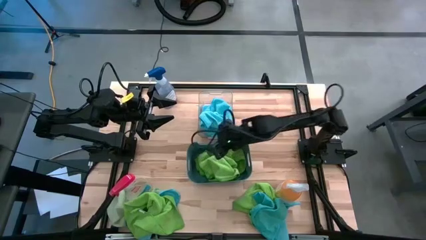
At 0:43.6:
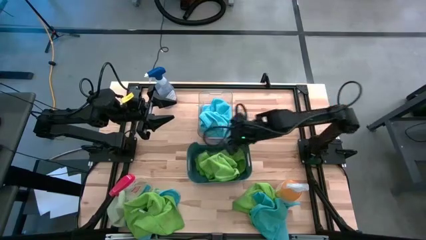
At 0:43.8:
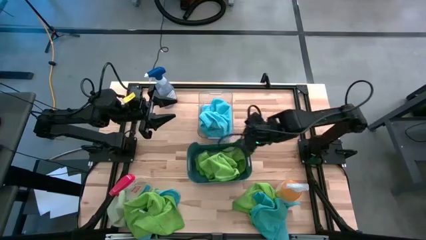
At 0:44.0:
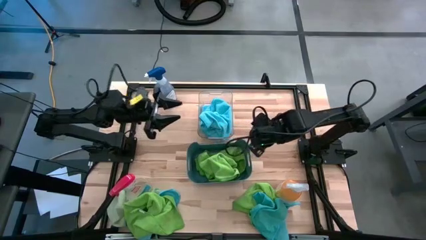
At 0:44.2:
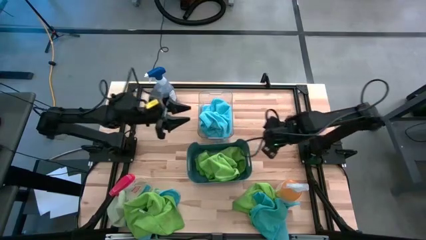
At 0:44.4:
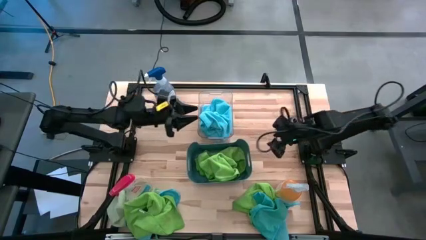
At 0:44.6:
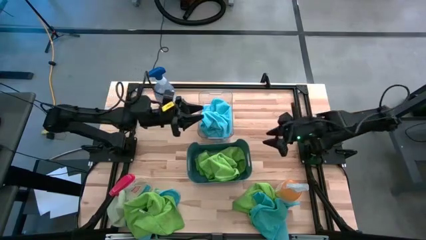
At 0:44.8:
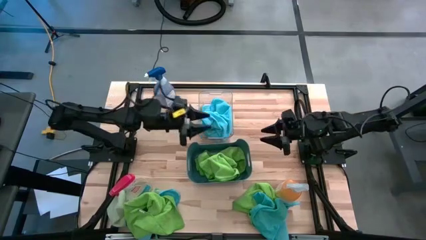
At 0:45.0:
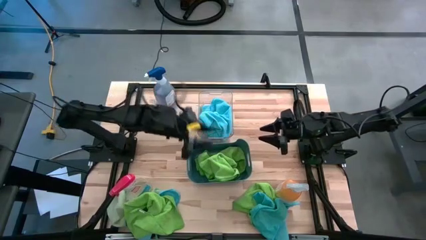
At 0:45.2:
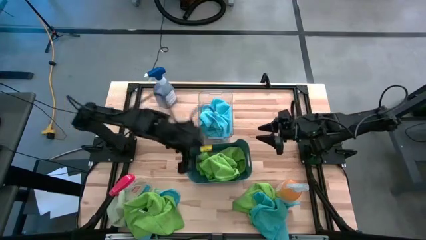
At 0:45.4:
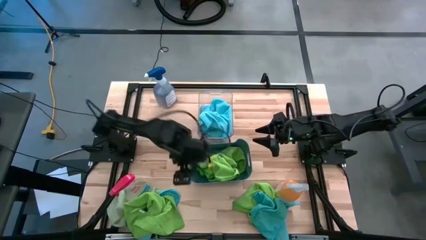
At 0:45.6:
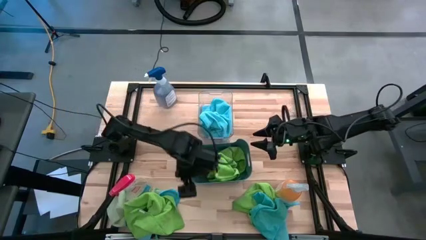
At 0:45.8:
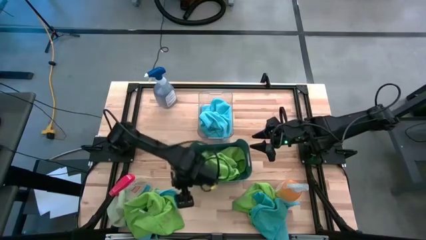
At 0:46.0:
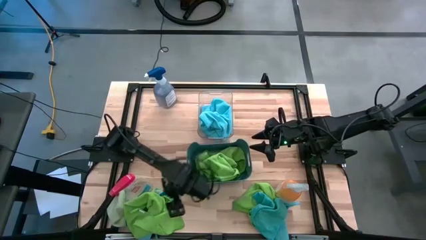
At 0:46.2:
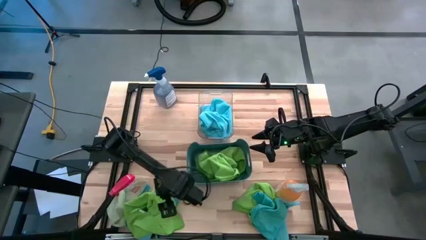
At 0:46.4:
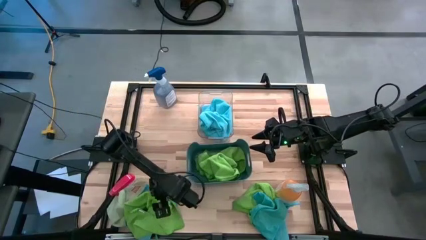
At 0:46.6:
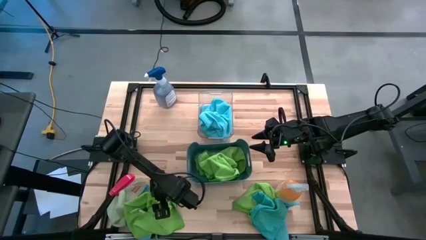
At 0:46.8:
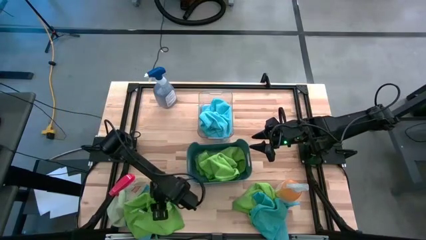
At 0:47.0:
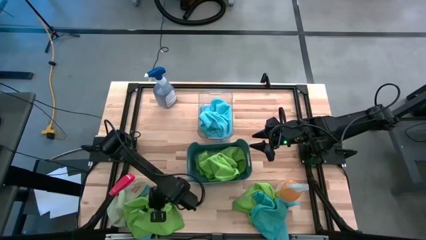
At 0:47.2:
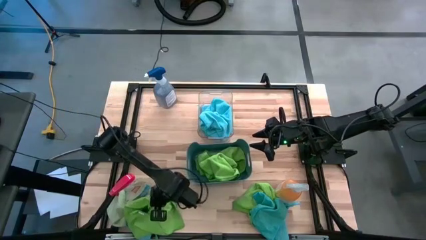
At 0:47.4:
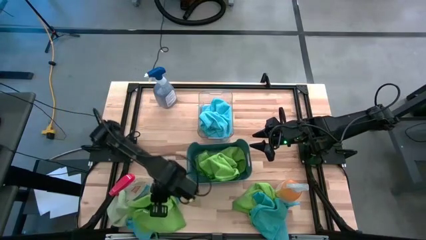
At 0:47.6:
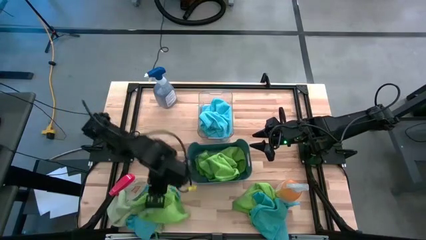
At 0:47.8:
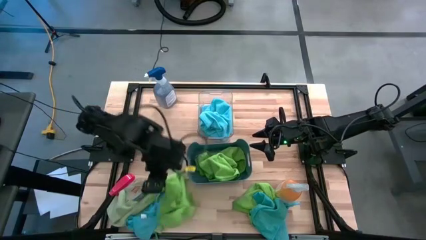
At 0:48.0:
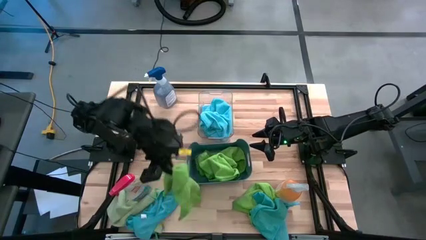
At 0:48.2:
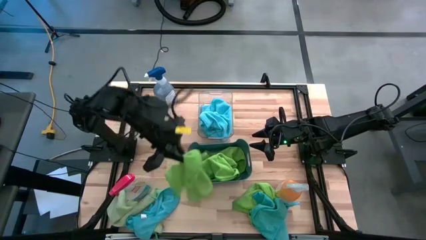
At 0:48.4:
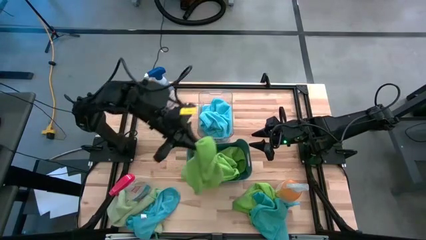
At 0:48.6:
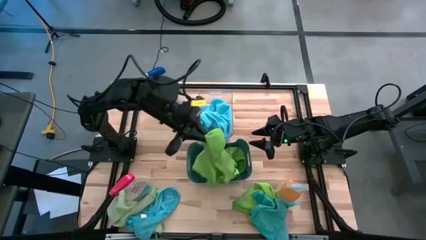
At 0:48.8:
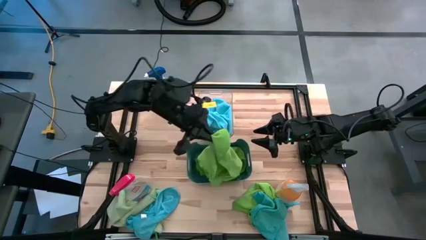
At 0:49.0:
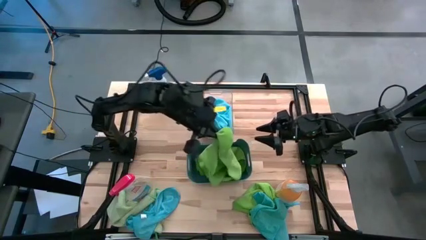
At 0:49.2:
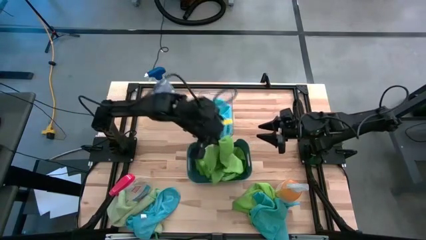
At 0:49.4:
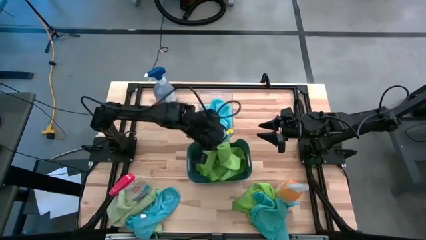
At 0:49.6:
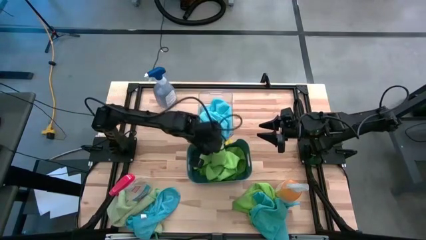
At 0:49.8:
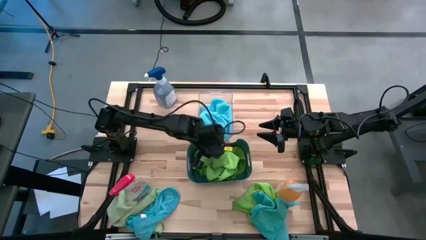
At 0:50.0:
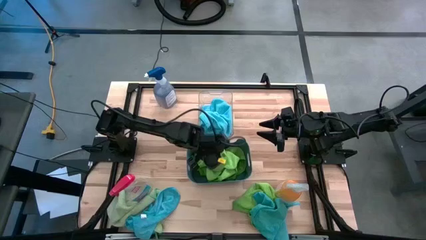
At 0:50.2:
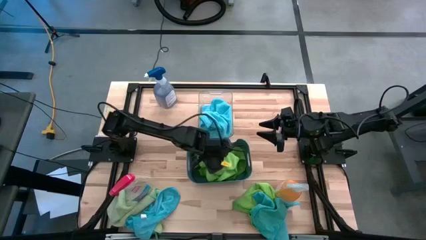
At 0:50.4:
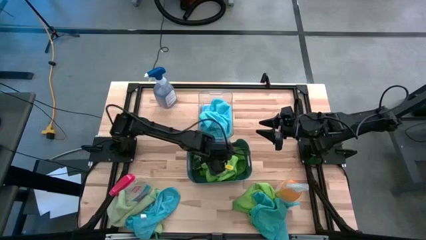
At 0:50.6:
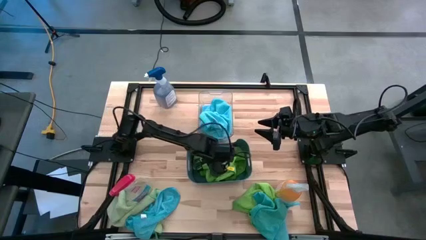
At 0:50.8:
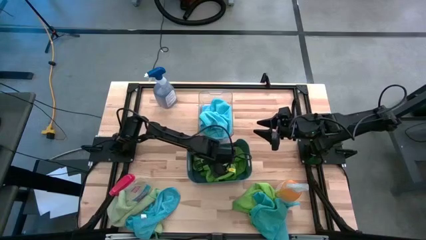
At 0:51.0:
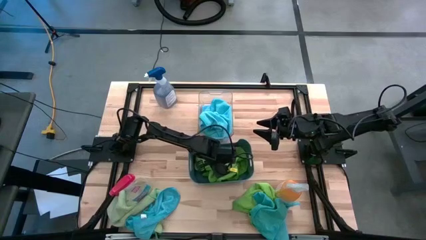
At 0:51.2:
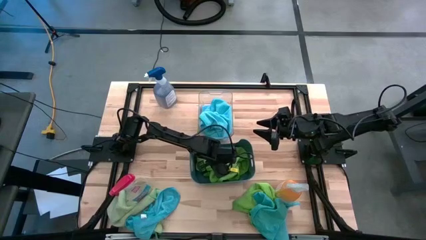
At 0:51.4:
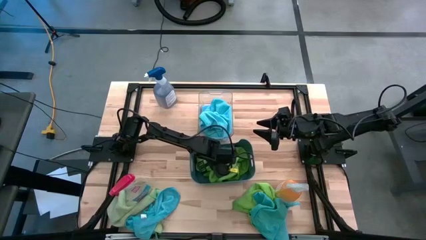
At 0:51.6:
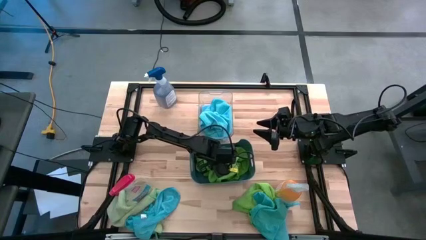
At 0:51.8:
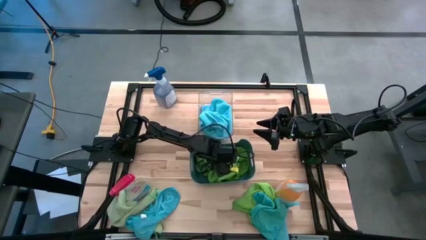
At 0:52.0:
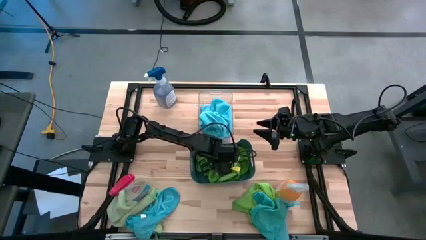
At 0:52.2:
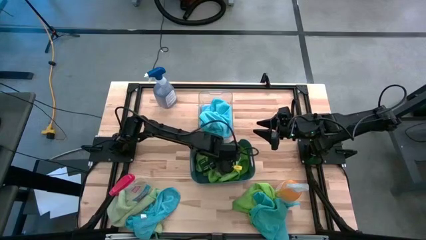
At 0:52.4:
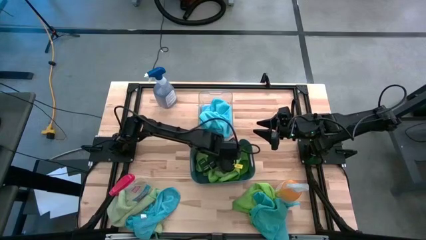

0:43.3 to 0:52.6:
Task: Sort microfiber towel by color & place in baskets
Put the green microfiber towel into the blue bin

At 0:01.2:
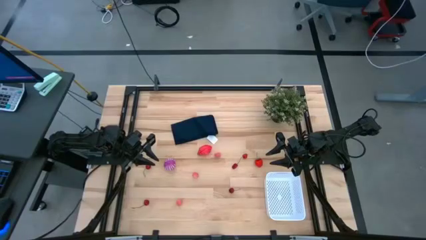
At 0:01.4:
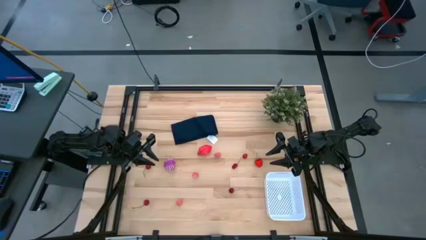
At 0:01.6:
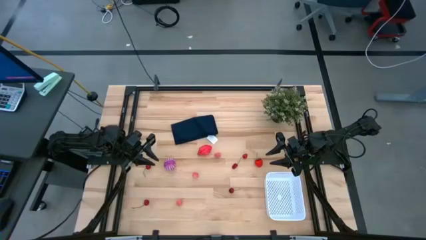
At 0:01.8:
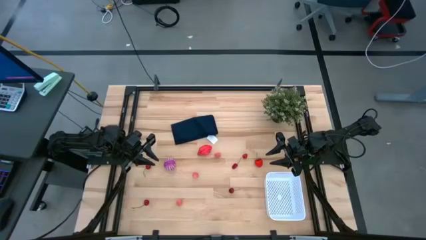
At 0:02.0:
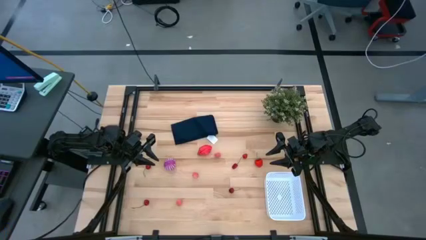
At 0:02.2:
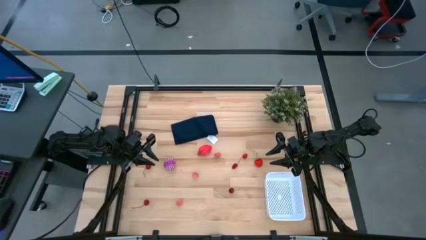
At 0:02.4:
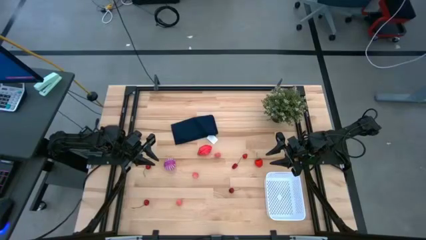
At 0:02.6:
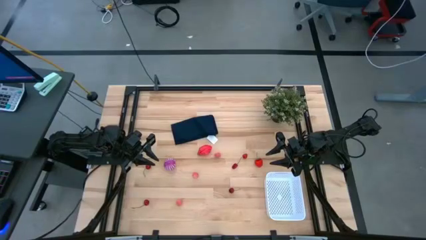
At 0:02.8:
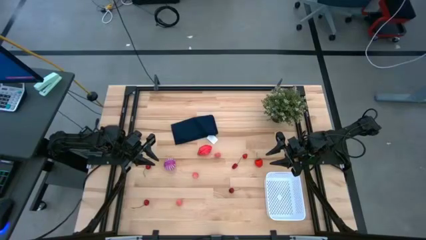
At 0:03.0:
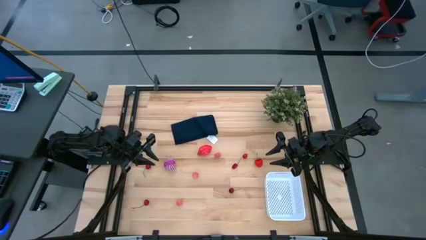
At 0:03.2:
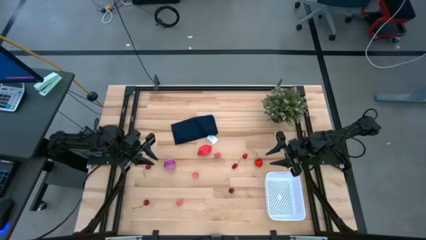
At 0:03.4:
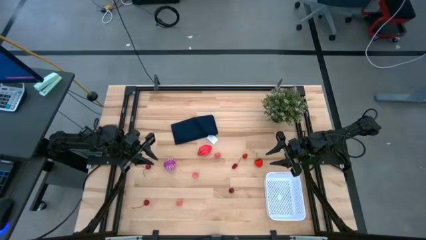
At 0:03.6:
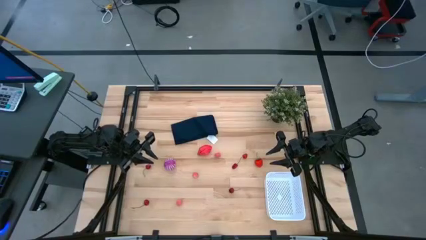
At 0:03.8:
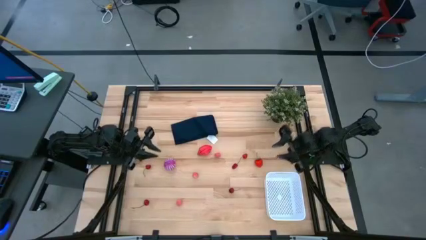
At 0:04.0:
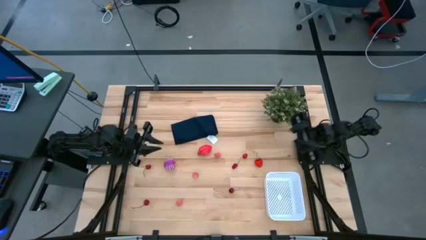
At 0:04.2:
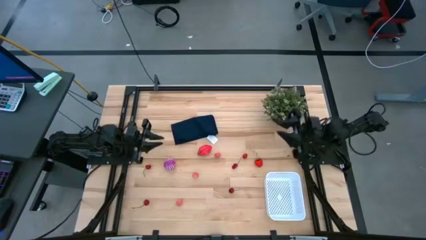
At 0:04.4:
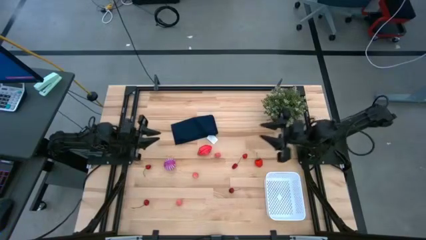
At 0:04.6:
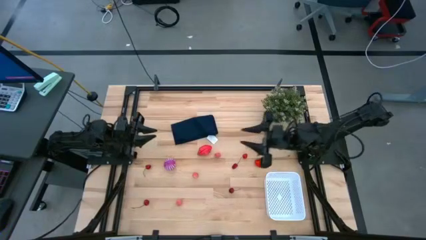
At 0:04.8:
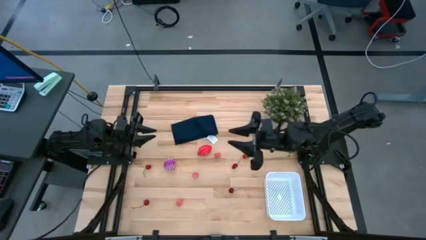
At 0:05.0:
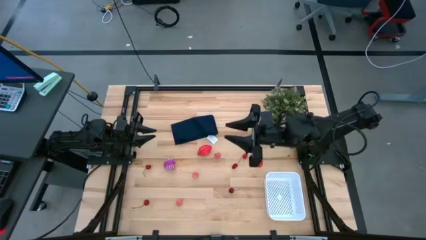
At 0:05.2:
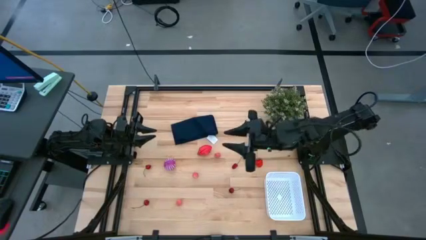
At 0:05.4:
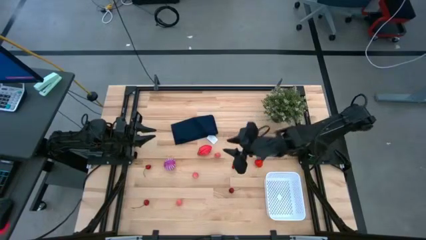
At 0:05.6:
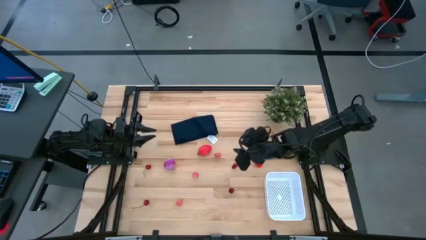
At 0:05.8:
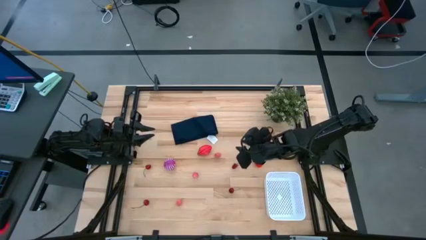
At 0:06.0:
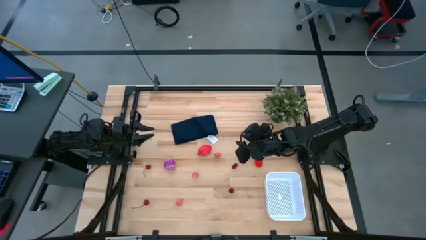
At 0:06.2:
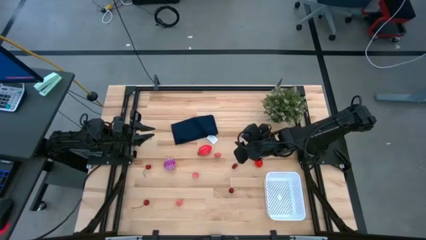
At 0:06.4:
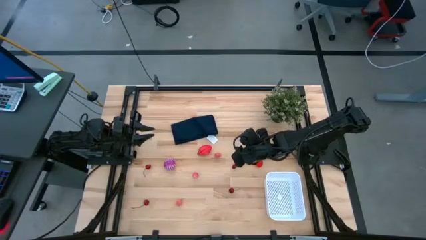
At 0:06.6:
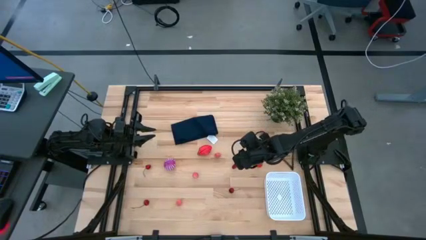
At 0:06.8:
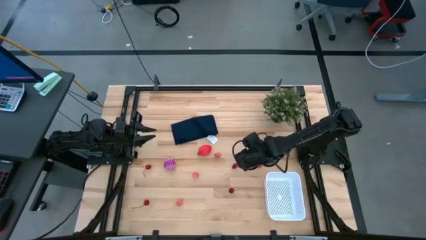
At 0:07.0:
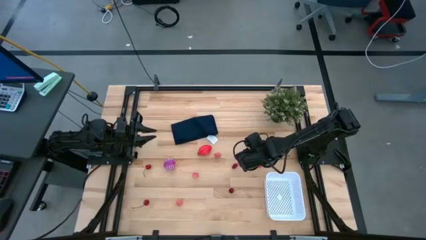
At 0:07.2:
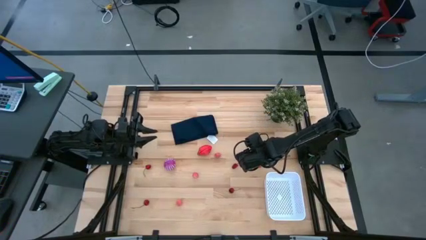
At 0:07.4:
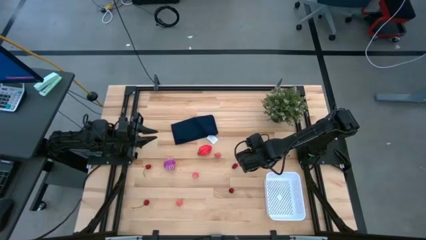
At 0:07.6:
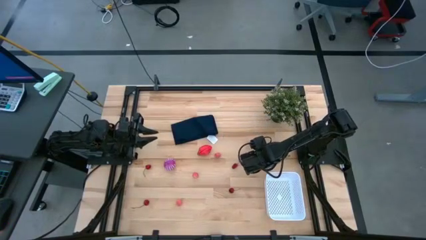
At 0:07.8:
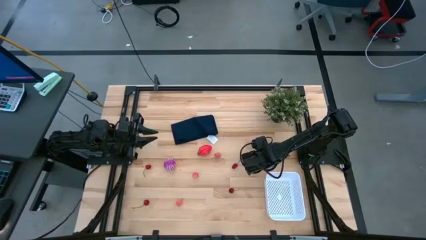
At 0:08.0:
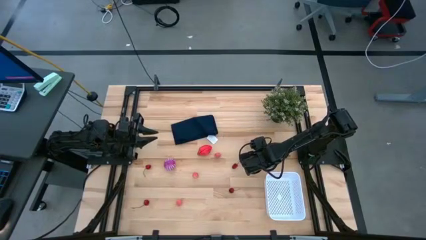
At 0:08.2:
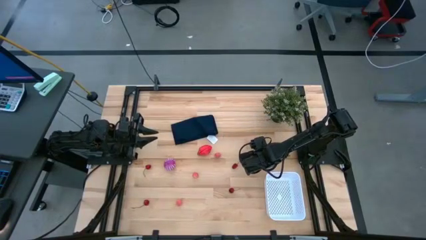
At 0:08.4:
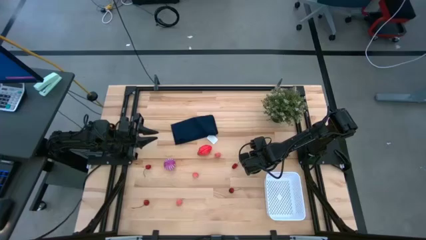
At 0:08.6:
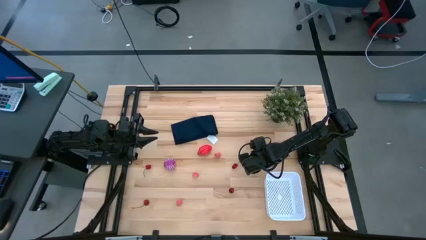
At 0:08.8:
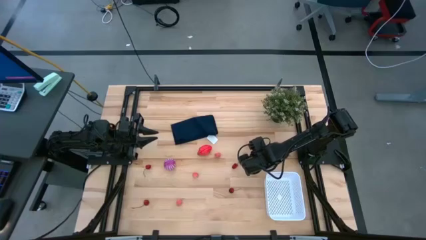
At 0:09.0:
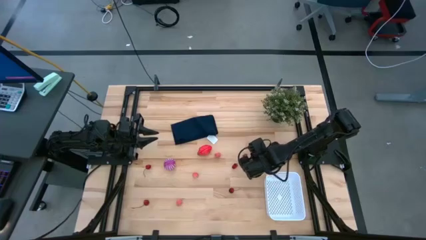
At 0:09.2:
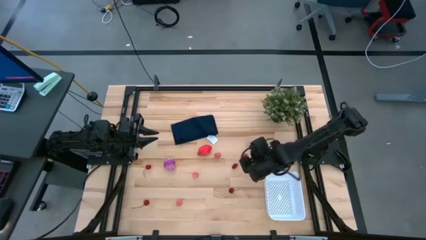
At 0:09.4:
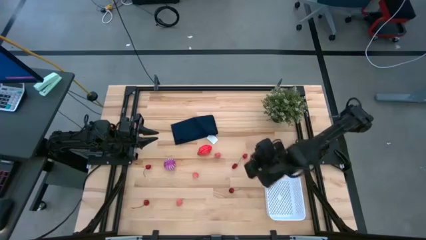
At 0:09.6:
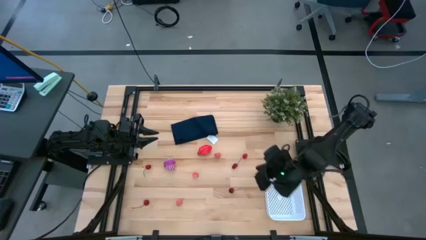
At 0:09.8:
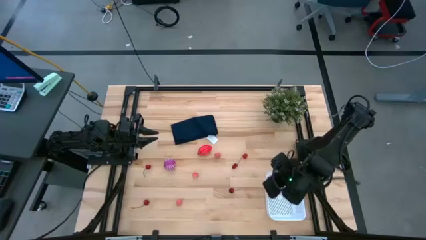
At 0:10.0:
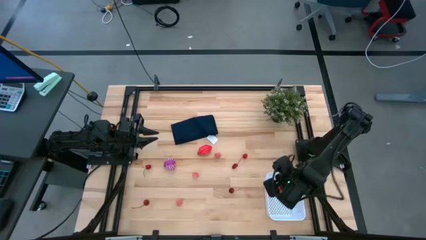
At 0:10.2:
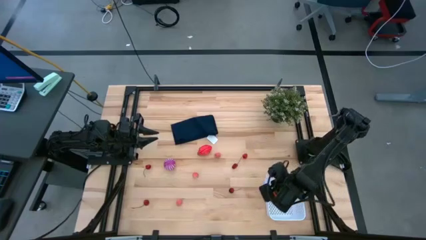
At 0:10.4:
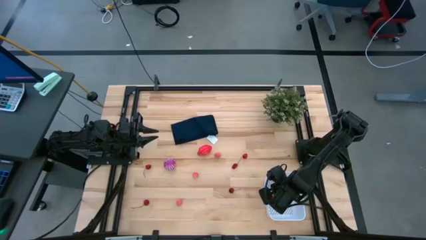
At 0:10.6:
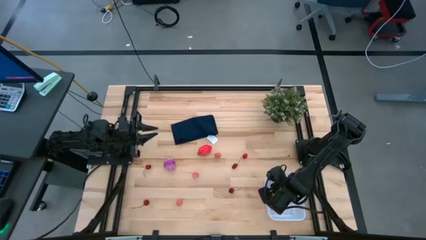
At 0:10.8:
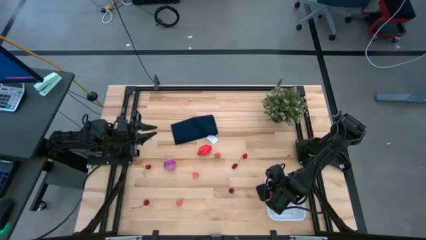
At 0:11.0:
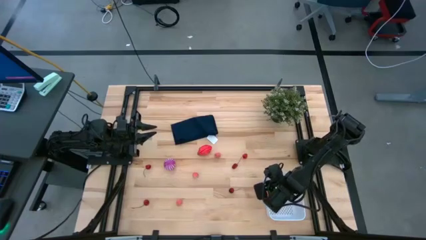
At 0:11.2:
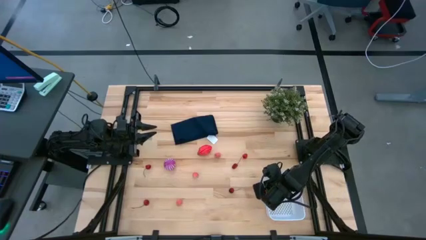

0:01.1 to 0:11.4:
Task: Pick and placing Produce into tupperware
Put the strawberry into the white bin
